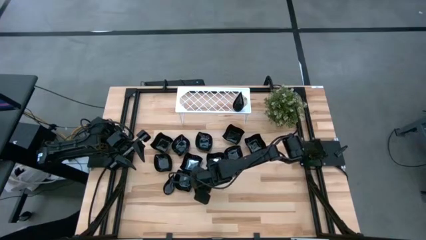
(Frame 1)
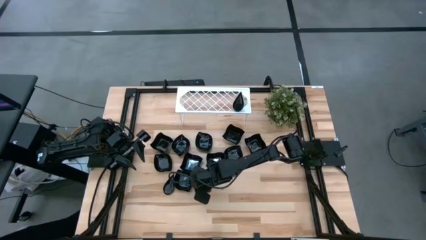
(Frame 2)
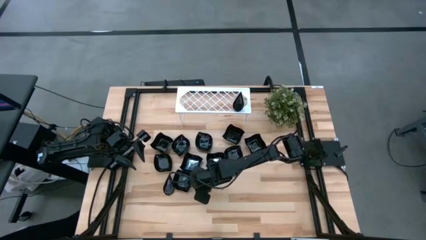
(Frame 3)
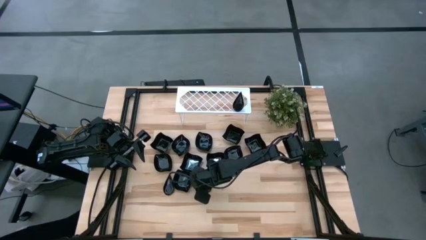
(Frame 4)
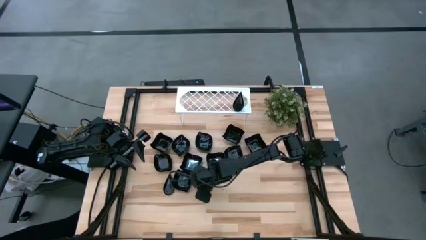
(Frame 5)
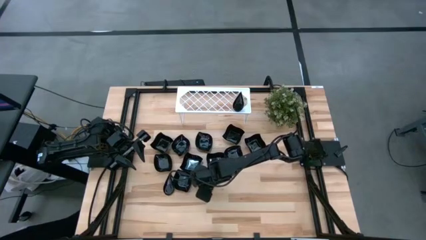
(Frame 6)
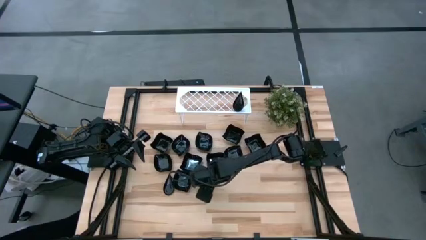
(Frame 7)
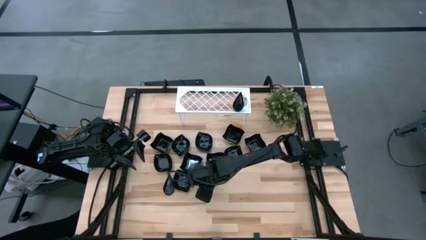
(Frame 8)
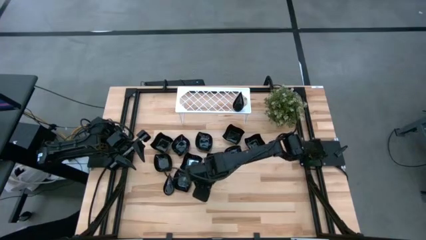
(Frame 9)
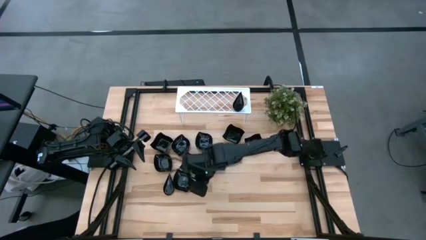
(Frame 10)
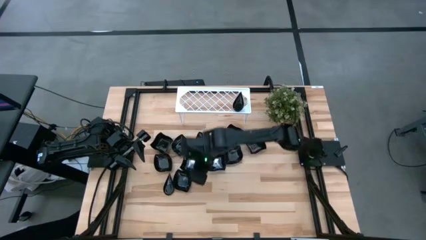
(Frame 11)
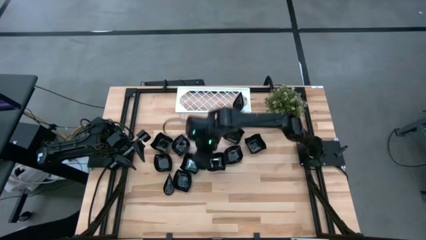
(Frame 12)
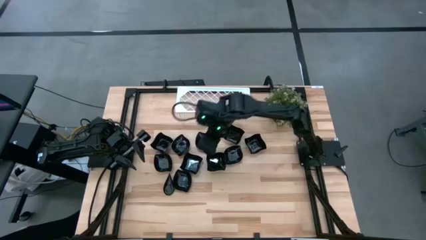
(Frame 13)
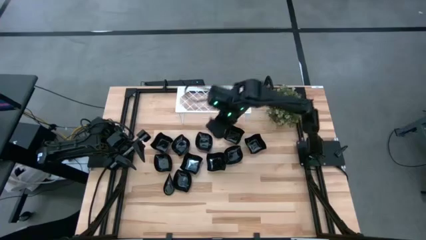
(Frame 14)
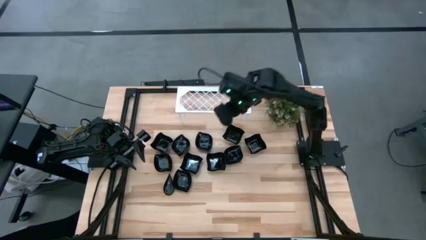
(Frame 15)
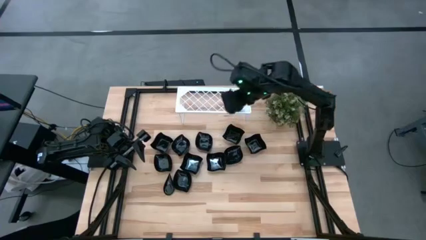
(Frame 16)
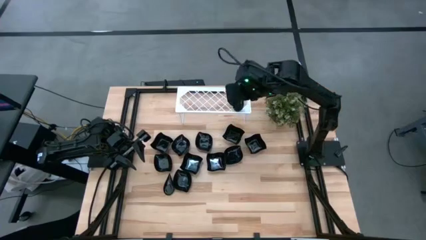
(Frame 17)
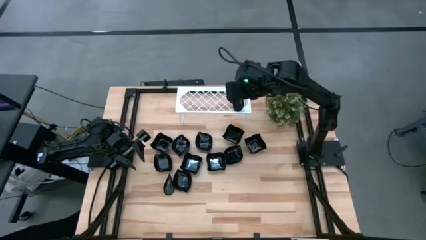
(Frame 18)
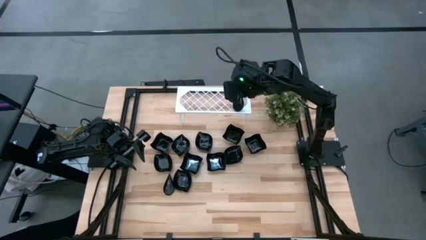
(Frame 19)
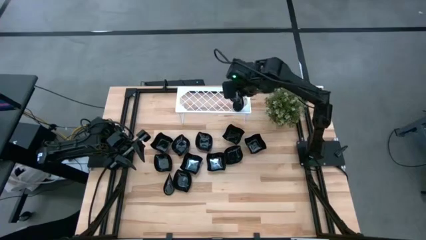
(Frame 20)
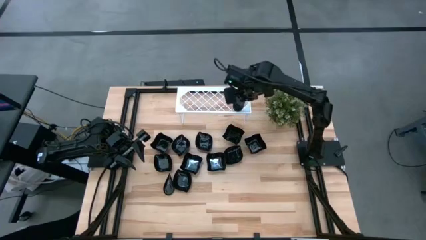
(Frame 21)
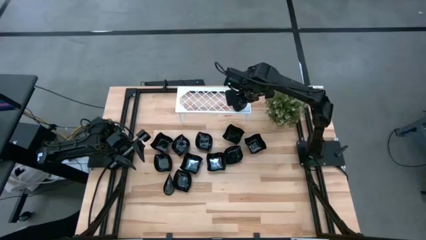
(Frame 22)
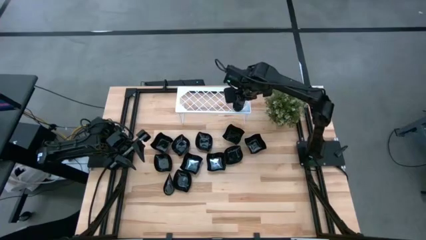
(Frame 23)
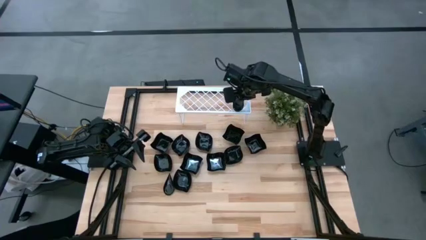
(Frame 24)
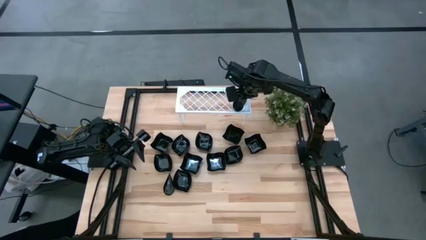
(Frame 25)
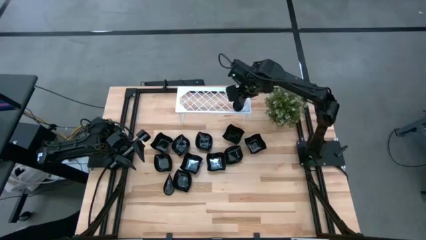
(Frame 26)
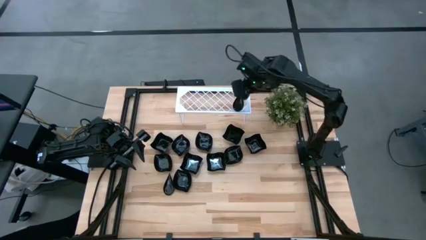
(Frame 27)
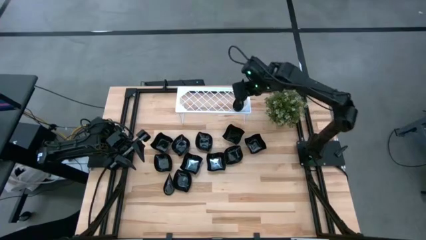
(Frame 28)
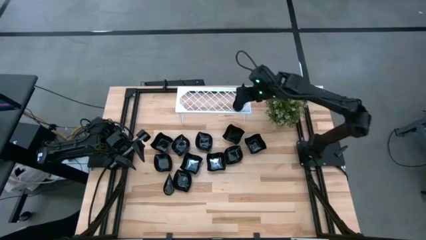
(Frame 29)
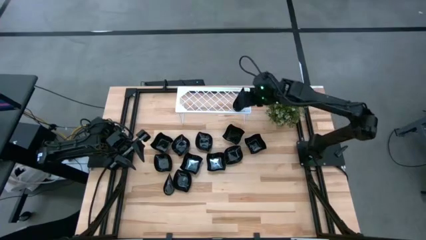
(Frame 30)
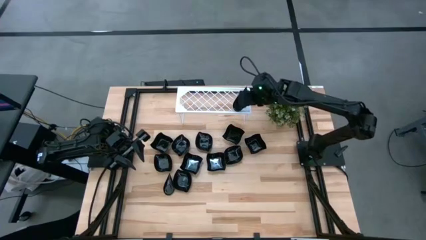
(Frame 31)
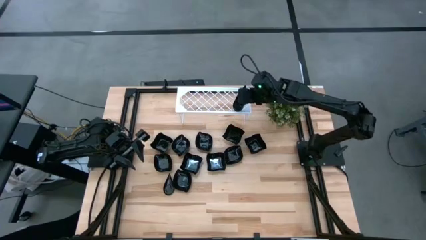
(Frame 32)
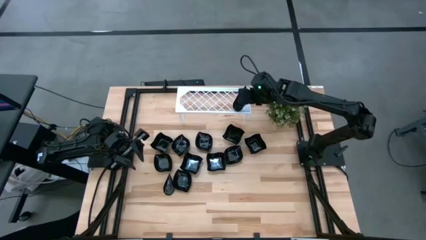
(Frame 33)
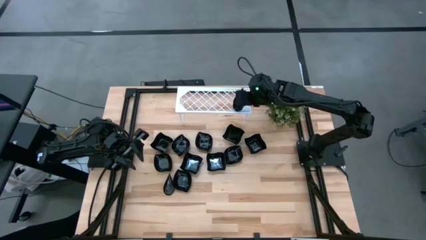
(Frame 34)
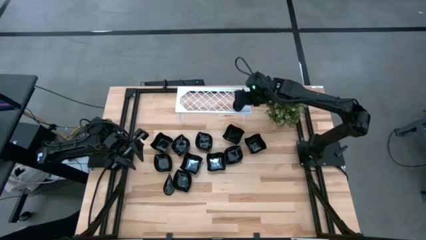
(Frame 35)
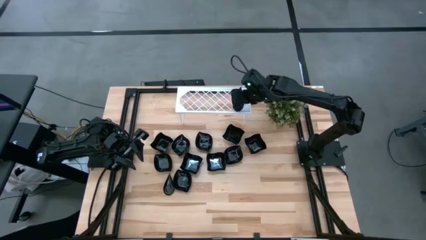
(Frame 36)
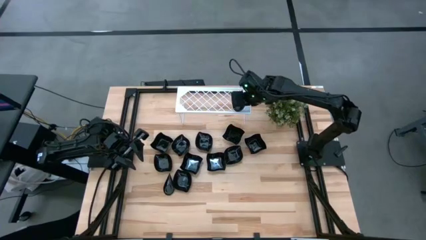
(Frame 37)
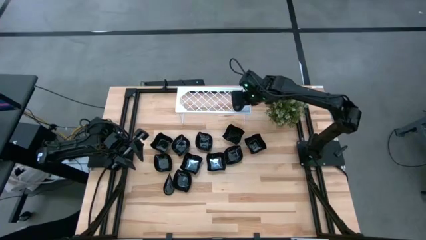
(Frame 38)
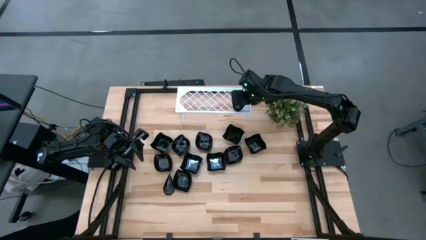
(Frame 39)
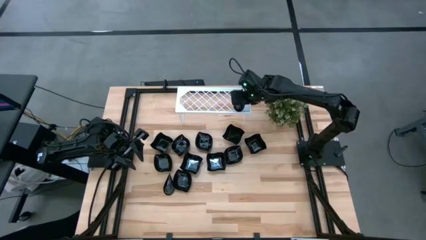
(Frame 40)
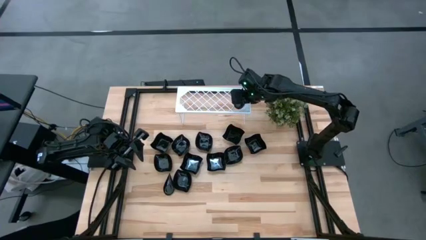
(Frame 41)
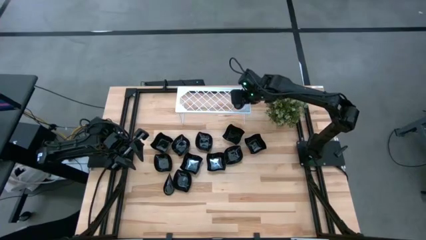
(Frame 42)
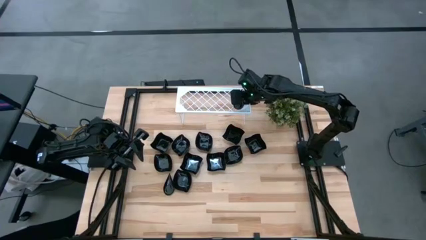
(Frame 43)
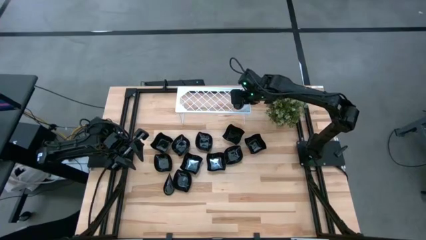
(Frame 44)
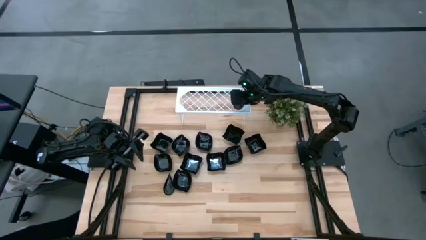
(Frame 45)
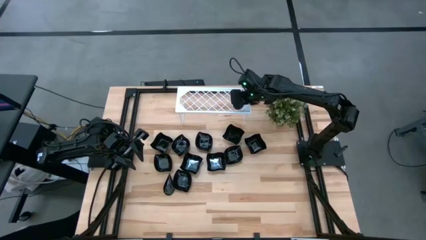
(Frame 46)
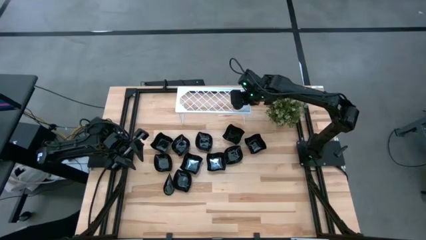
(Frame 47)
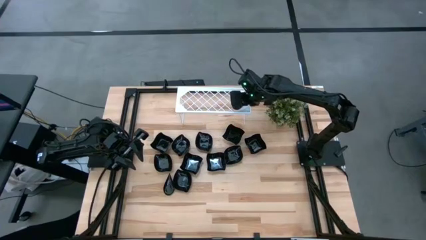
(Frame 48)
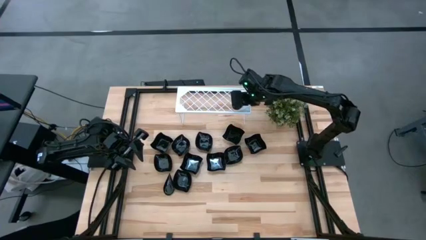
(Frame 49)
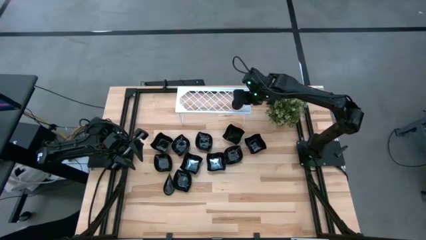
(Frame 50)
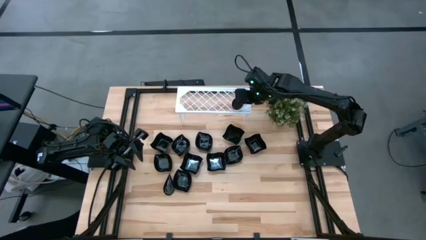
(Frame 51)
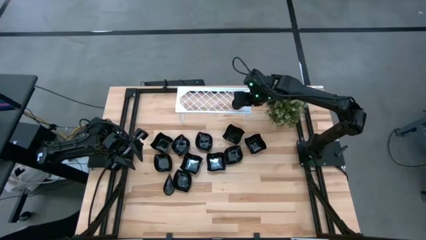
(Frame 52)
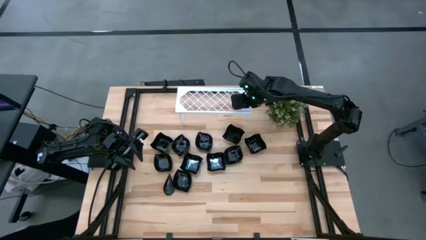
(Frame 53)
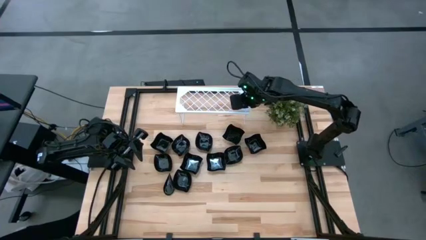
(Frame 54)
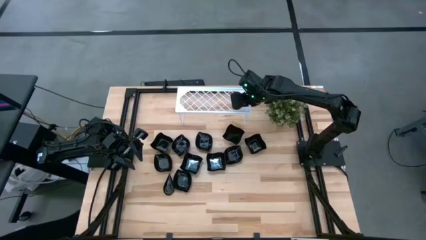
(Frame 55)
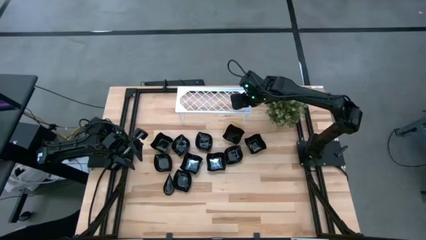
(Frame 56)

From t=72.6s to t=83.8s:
Task: Pick & Place Mini shaped plates
Stack the drop-shaped plate on top of the drop-shaped plate on the shelf

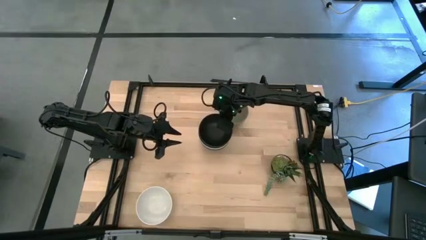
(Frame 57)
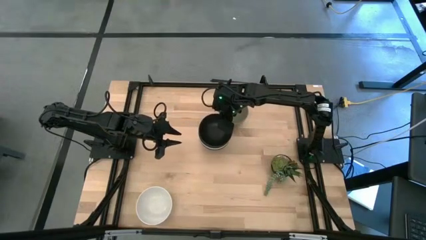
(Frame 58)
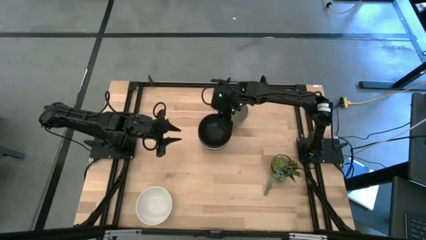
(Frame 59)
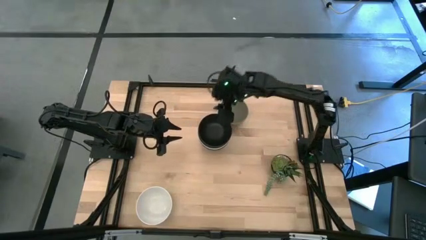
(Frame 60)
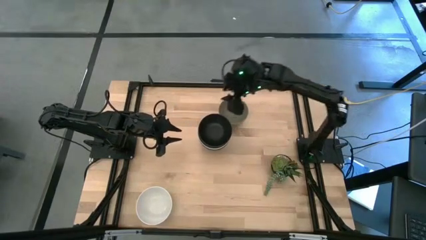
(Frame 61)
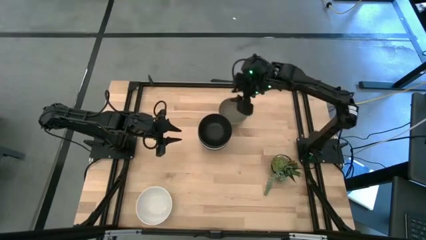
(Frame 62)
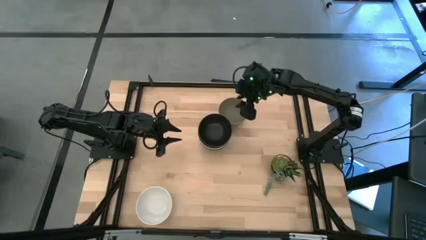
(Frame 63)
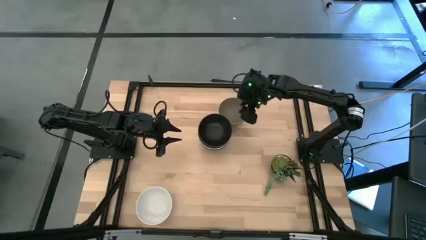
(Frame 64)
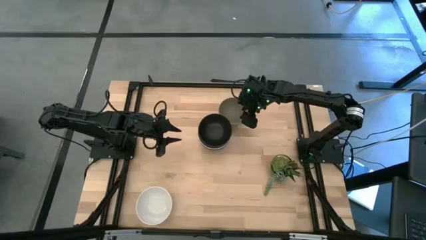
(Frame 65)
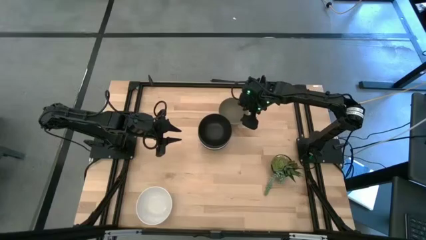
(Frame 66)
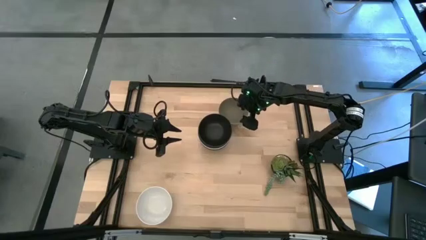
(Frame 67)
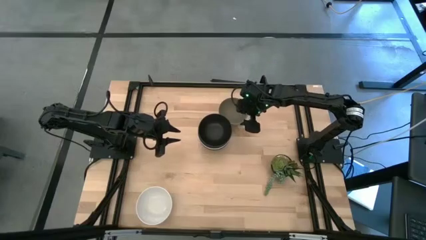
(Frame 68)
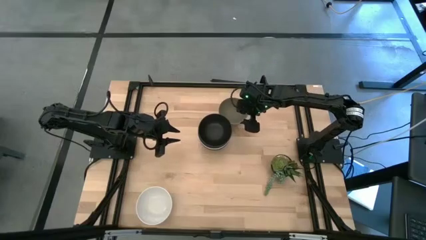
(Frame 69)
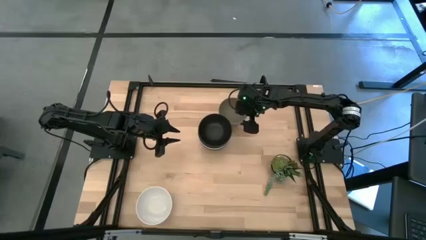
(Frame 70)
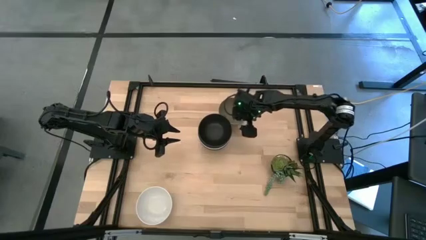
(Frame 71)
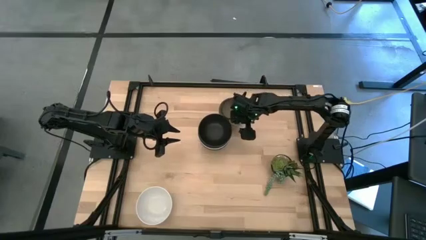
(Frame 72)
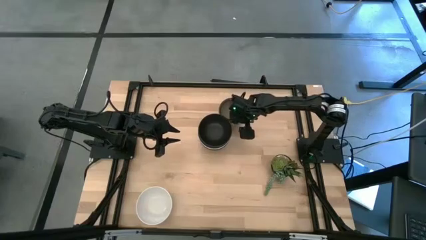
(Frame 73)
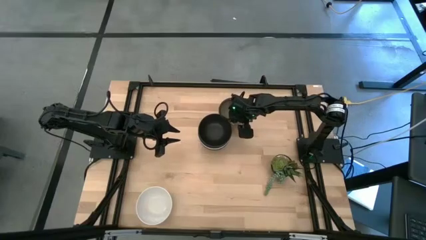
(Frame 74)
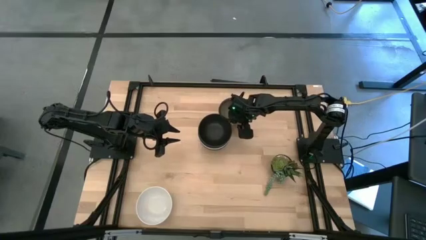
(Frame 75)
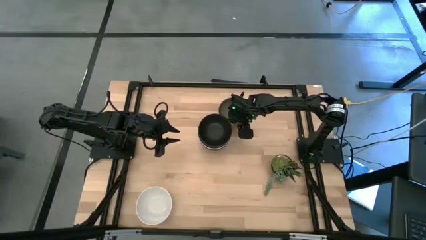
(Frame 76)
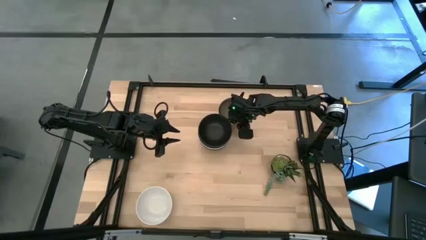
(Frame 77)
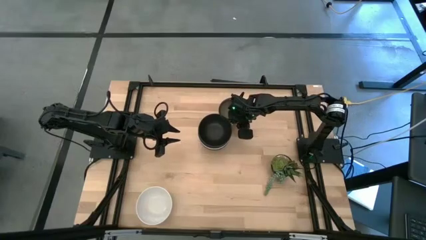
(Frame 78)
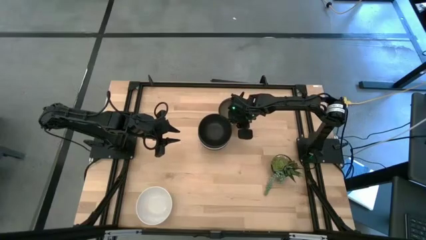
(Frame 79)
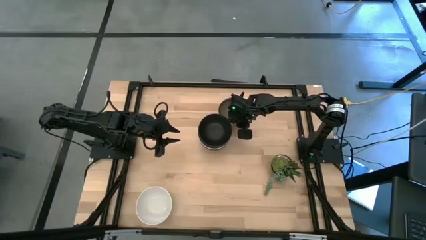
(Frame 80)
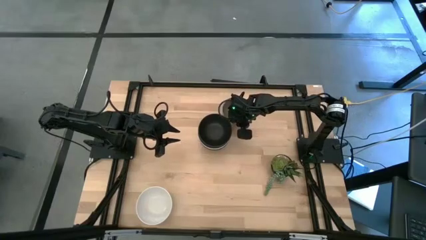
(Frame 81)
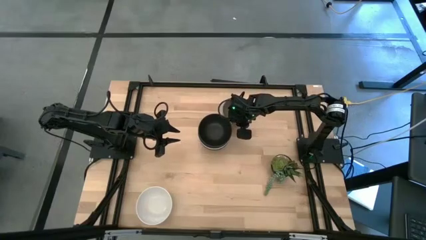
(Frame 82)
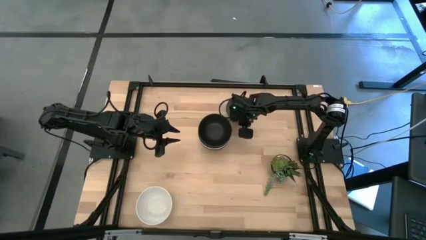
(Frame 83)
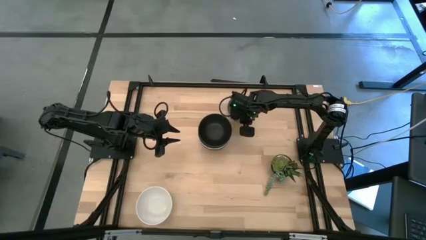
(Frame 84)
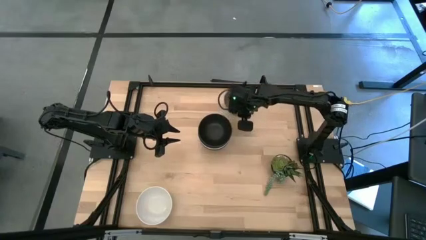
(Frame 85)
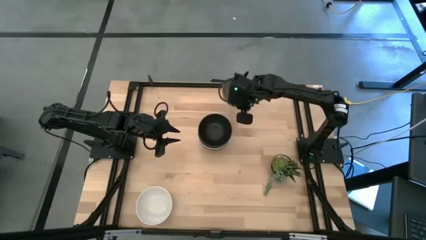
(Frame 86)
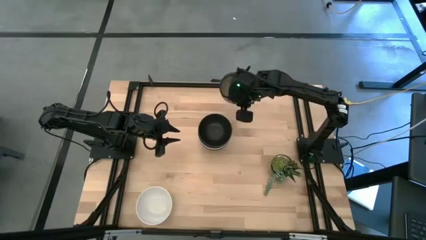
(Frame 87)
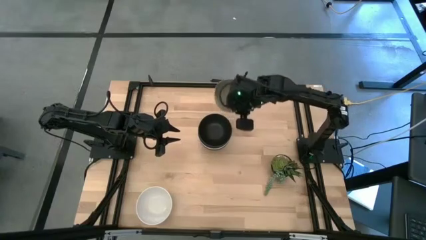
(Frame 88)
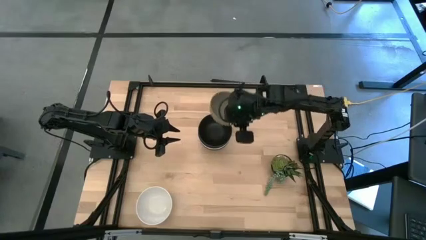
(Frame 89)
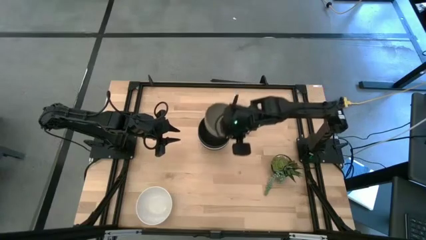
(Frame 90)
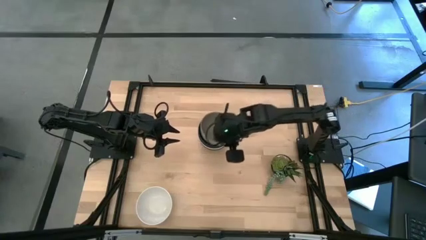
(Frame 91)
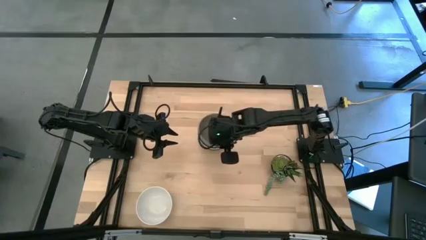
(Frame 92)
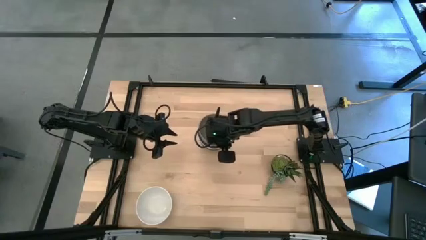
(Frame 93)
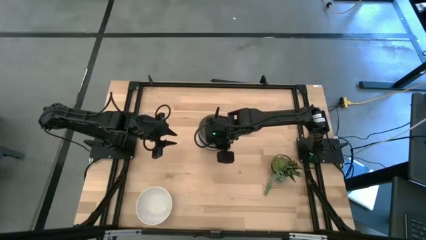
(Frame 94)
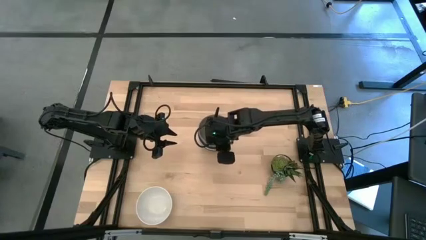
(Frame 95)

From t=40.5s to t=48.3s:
Task: Nest bowls inside each other
Stack the gray bowl on the black bowl
